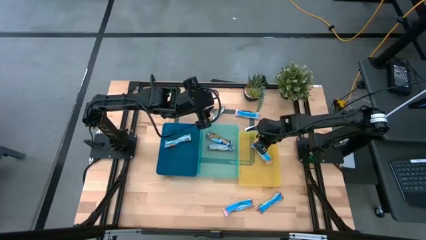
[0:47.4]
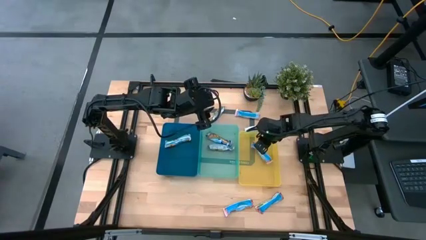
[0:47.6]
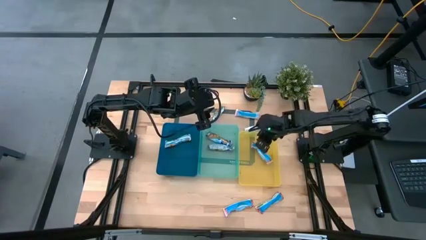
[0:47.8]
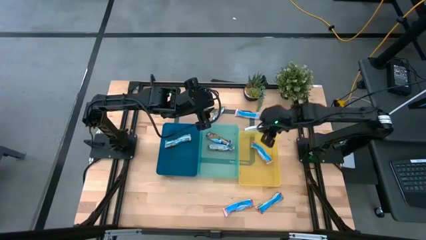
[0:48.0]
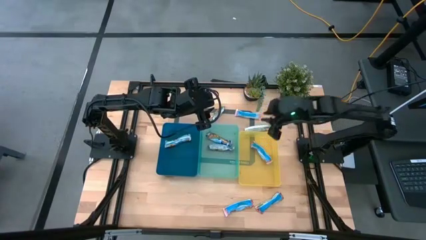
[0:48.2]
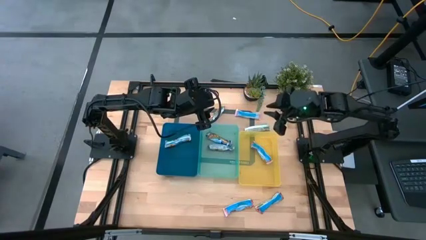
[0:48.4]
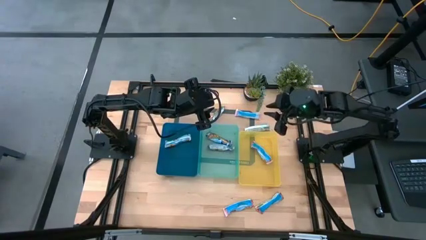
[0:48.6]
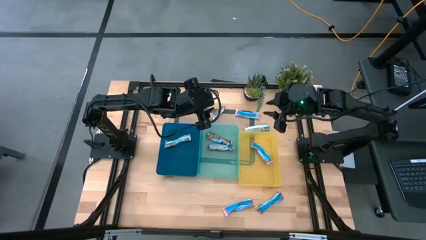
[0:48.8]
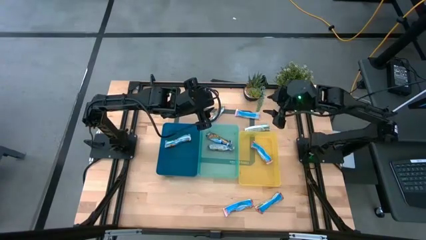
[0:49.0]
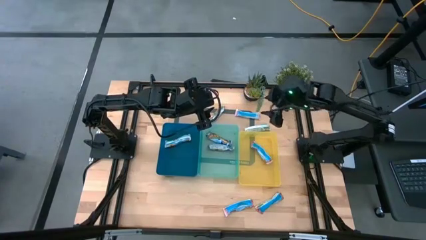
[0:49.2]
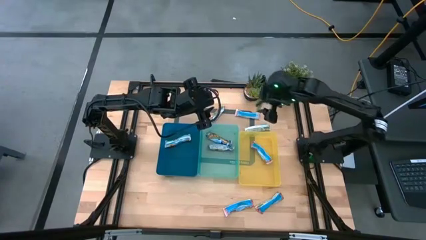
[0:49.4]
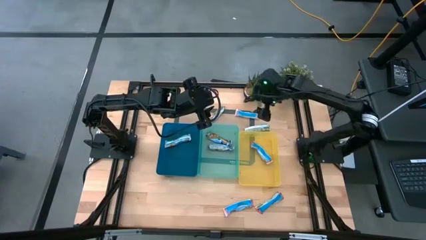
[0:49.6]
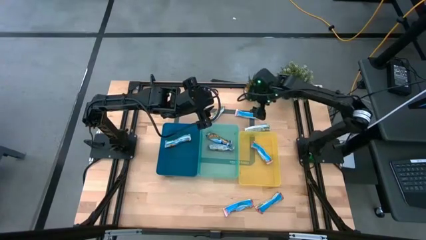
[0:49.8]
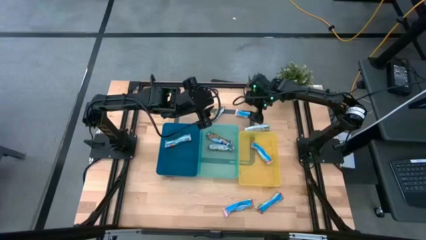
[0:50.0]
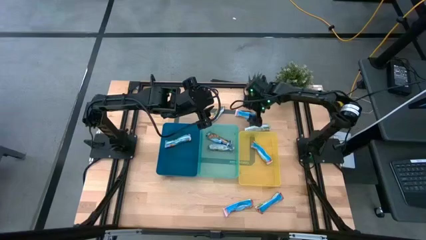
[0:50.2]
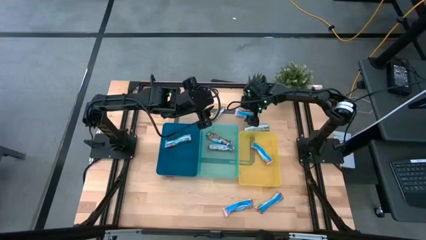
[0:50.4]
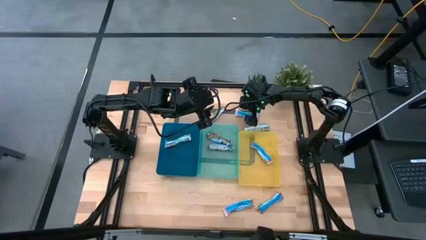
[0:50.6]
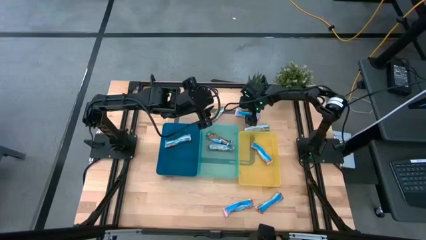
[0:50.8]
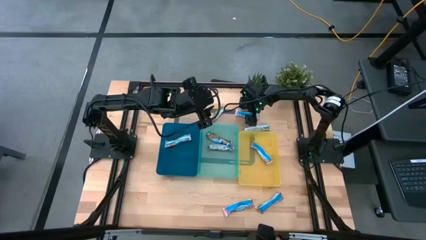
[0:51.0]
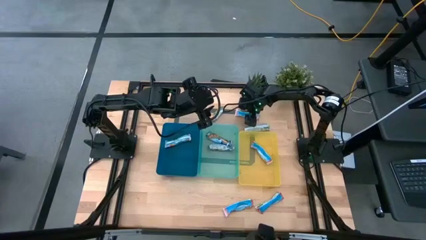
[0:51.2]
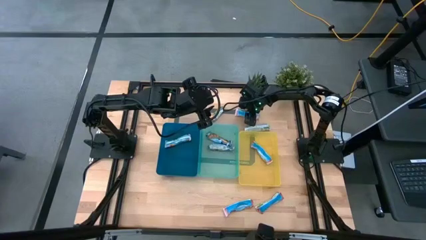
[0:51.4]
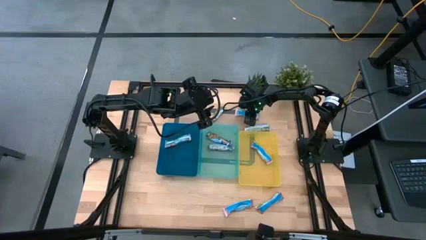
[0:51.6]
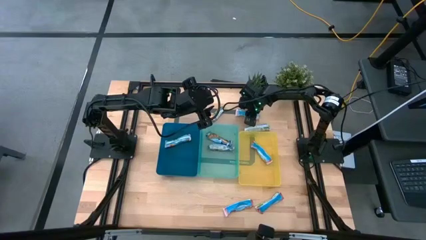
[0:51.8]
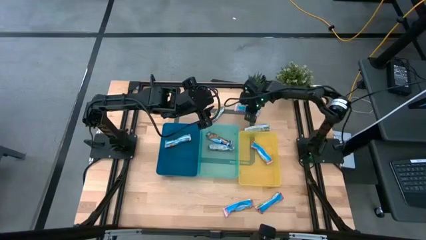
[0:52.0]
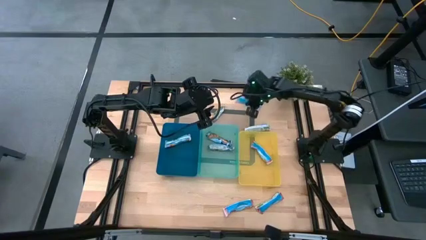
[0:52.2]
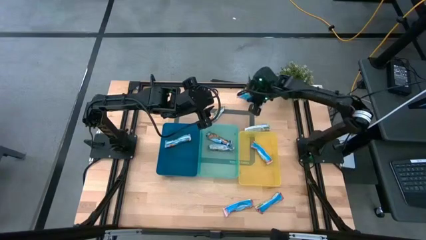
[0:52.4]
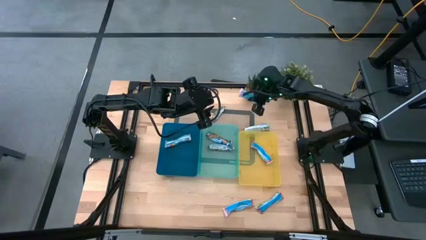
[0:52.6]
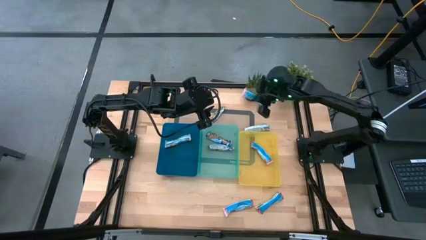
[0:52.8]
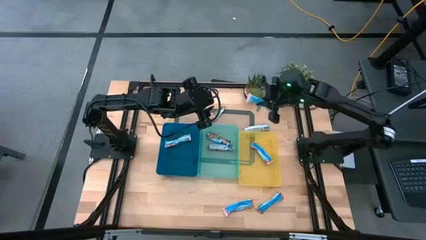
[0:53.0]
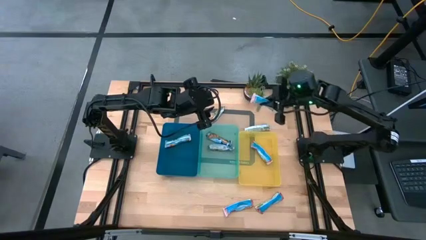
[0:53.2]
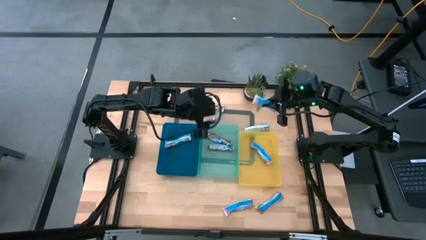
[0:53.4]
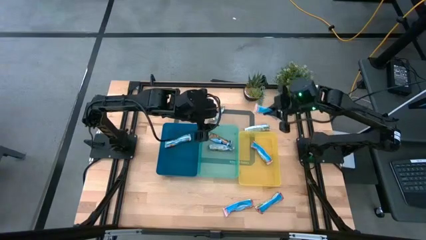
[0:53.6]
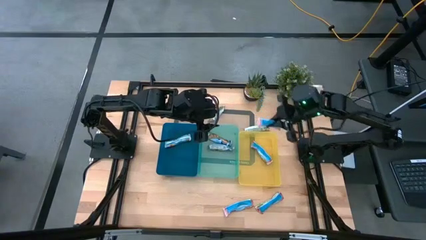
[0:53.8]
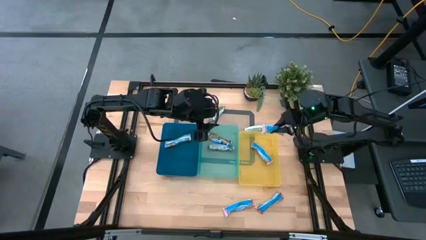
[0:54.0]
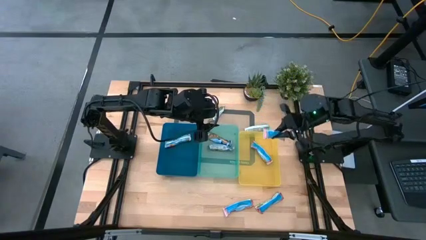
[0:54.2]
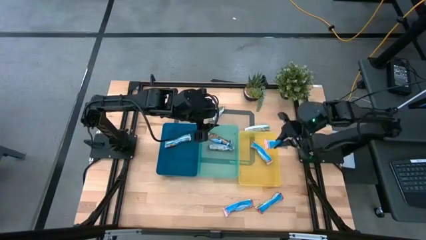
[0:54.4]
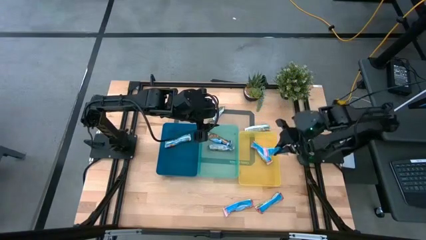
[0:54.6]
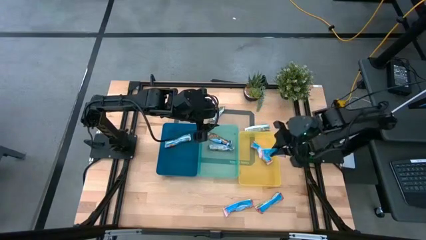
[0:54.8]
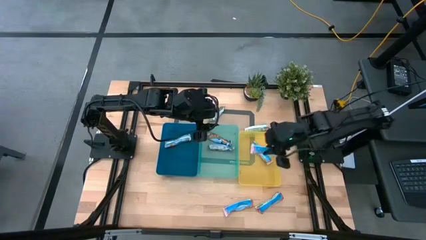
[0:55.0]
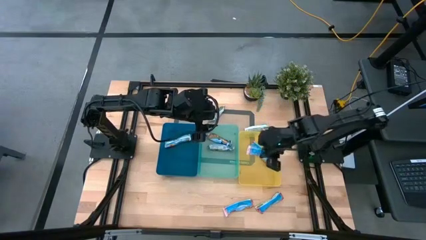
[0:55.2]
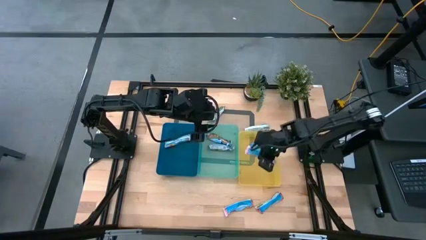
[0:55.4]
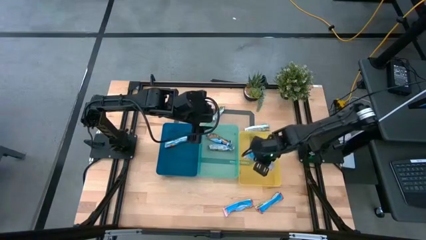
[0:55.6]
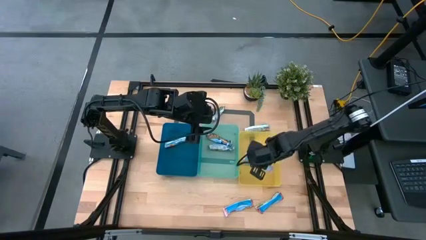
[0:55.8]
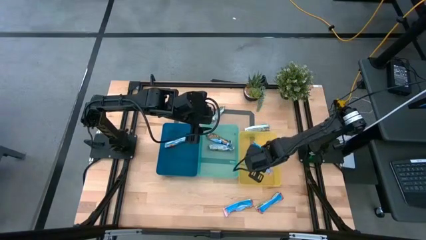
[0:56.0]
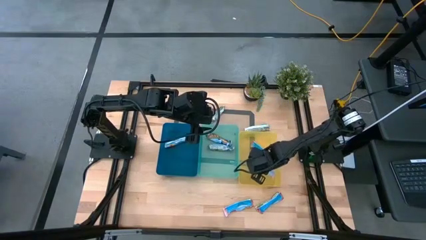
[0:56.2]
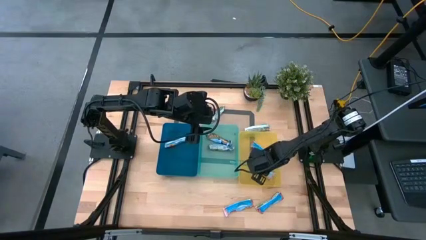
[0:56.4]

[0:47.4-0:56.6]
Task: Pick and place Granola Bars by type
Put the top red granola bar into the yellow bin

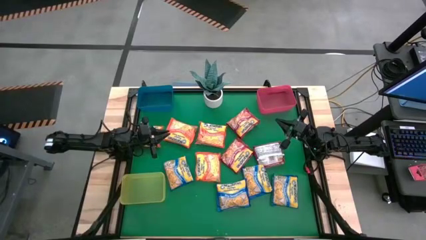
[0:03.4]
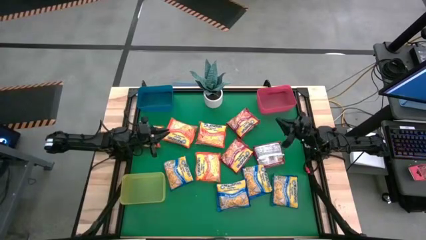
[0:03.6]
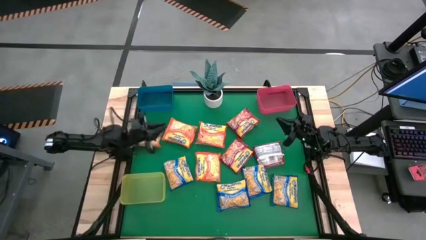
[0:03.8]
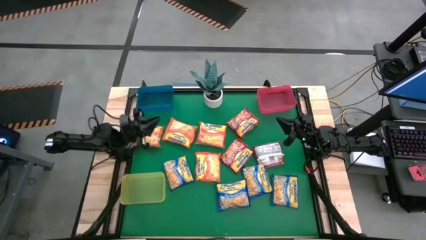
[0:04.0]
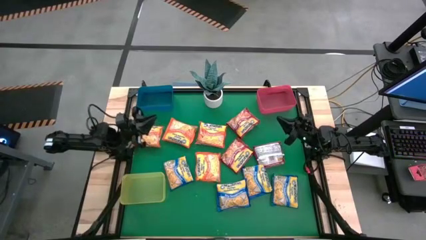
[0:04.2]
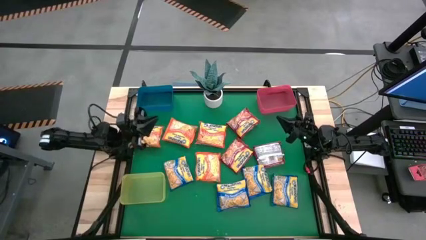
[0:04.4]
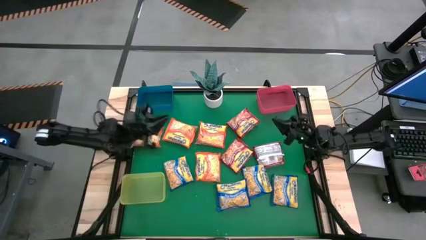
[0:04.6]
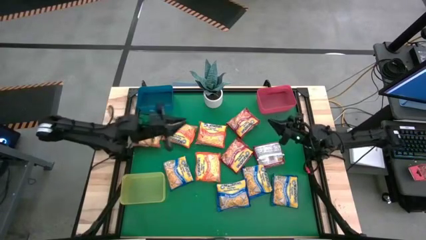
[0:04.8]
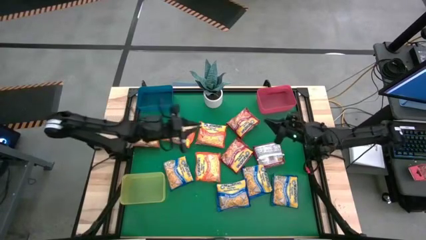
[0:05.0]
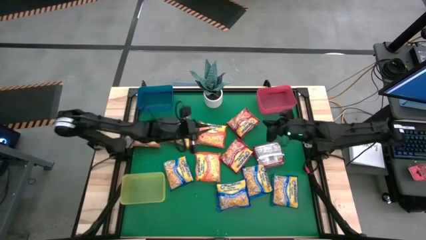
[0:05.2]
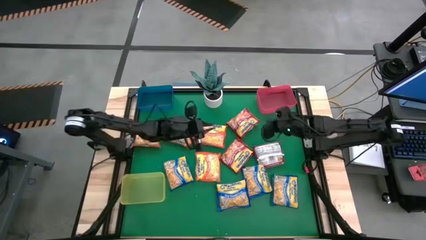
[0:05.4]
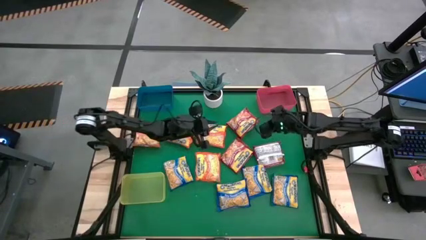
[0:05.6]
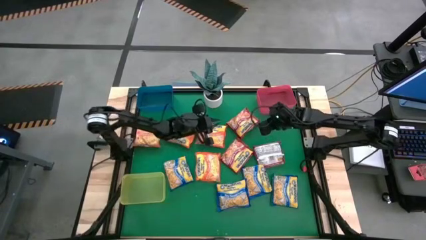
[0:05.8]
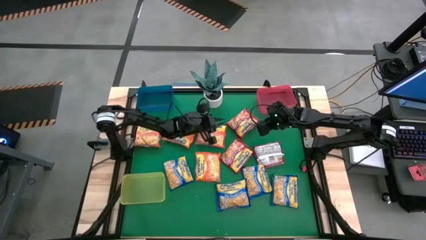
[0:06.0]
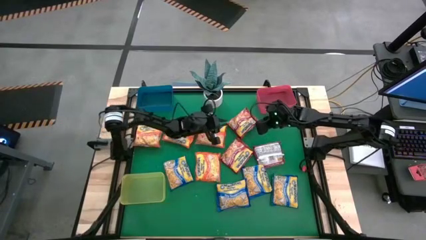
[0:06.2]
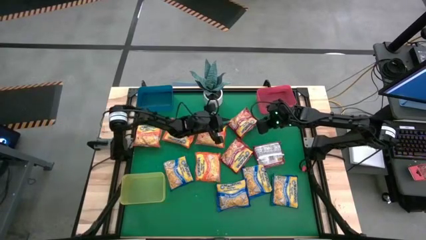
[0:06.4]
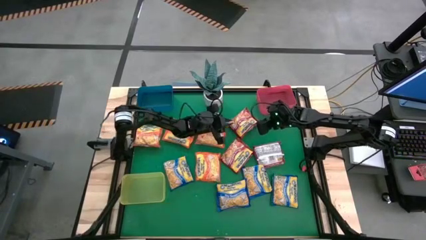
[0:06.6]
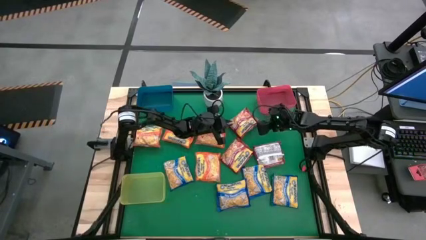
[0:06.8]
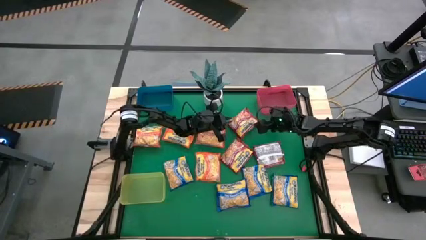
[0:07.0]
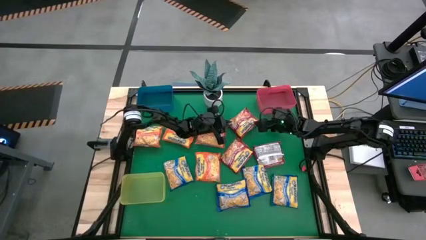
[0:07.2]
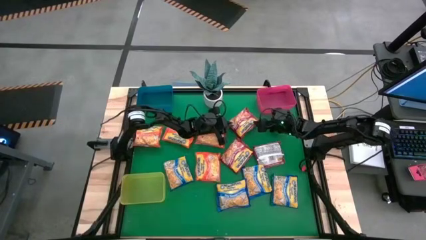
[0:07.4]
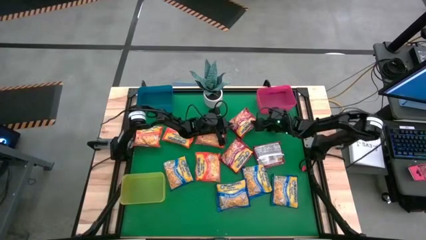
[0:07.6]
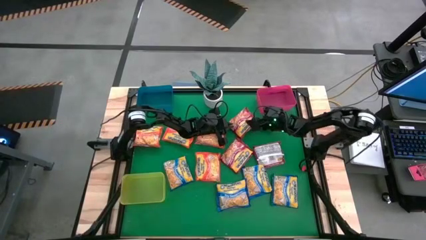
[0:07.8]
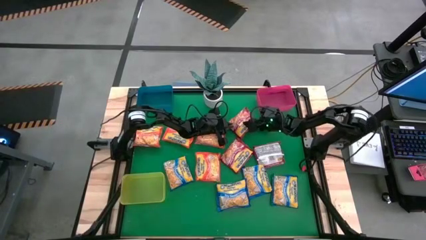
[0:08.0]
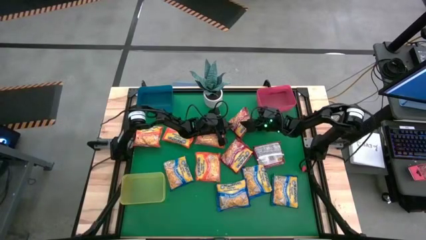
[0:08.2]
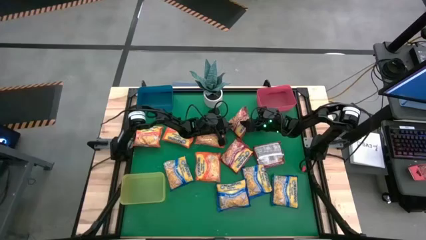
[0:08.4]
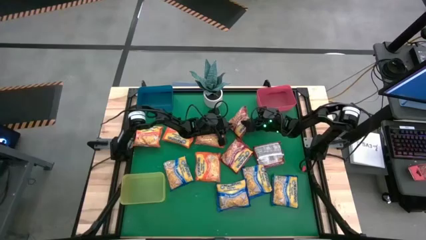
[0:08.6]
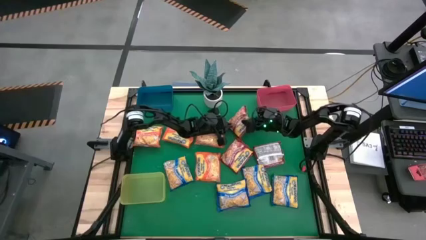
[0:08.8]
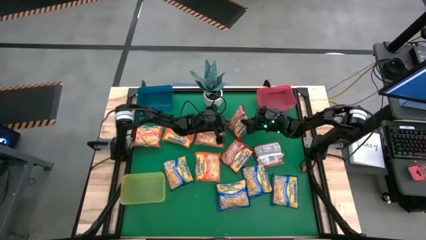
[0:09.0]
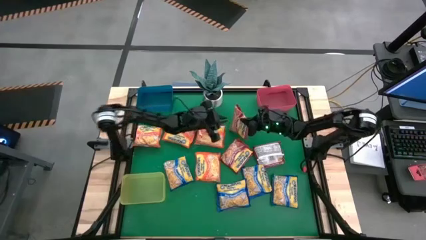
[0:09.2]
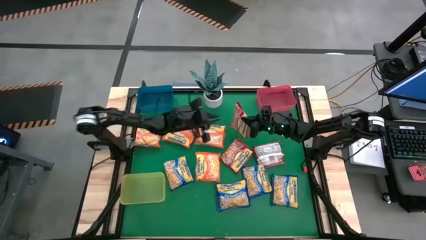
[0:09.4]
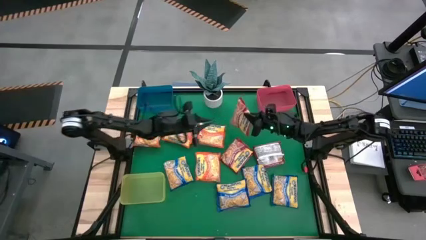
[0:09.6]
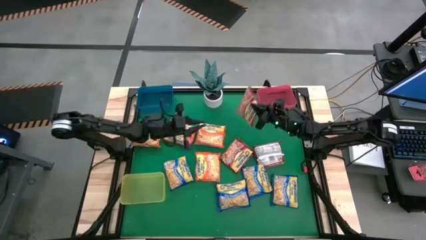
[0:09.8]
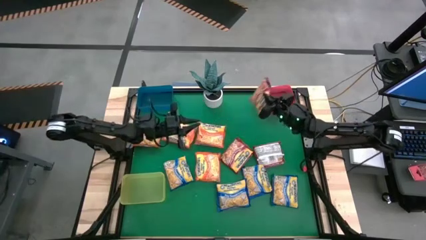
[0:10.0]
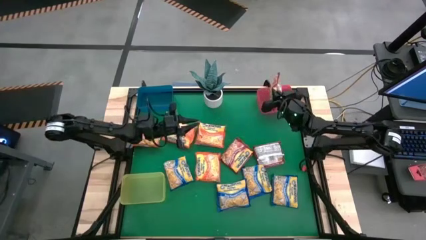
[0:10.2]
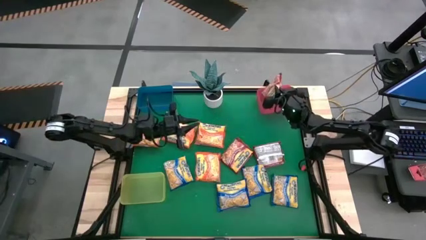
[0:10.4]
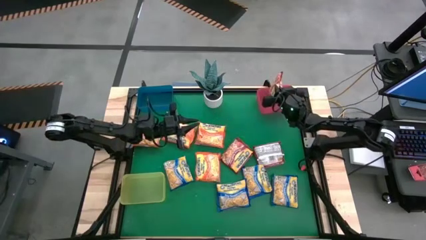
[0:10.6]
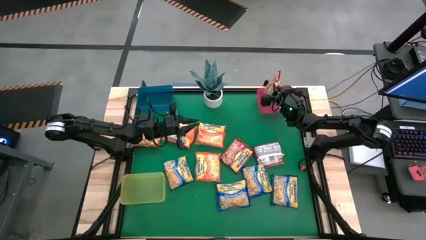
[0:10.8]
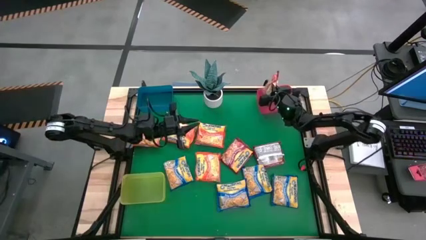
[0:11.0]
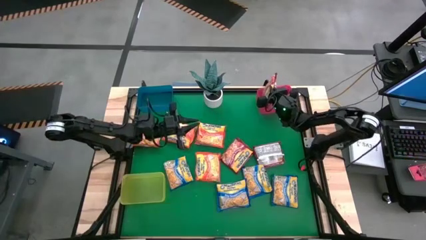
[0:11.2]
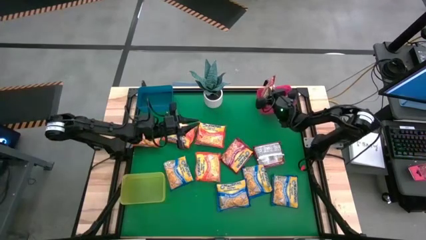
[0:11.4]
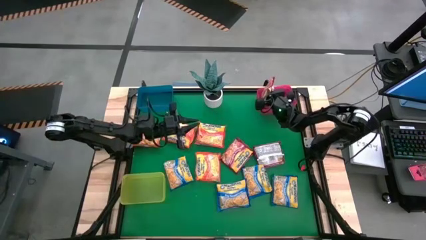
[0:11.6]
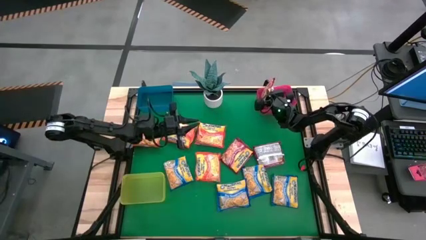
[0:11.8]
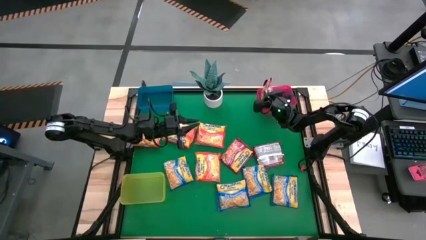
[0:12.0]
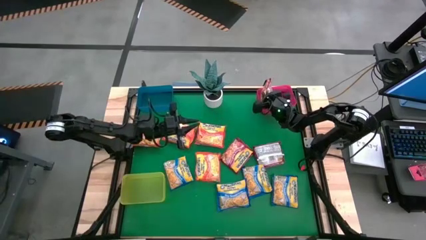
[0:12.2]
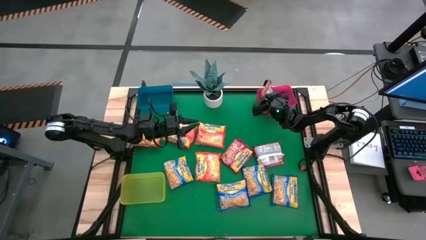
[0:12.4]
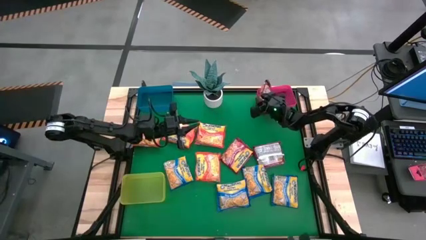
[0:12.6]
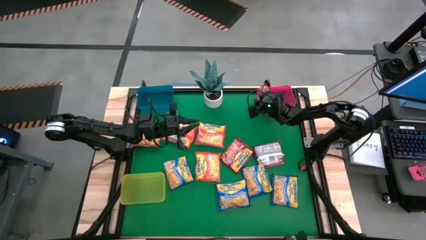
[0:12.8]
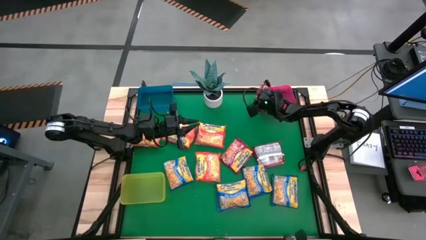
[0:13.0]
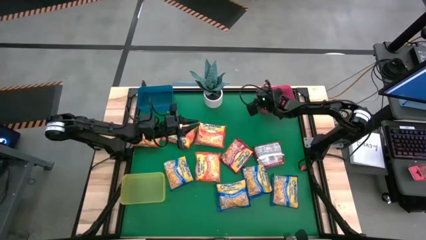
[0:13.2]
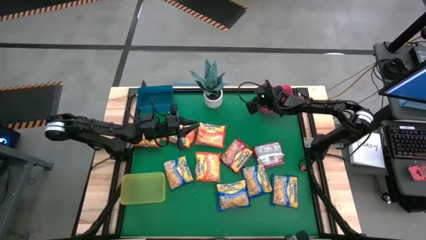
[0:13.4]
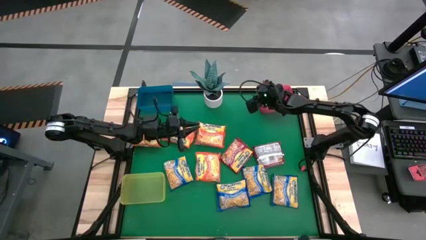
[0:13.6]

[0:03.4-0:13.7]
Task: Sort Maruchan noodles
Put the red noodle pack into the pink bin
